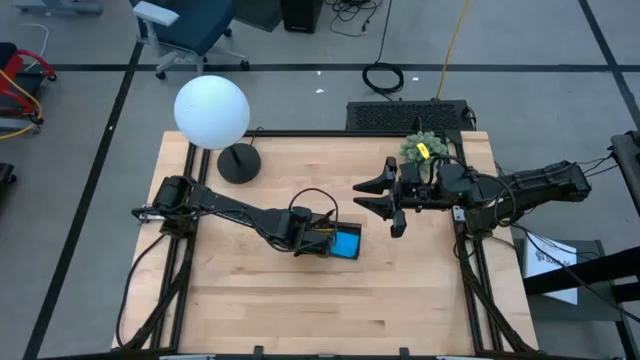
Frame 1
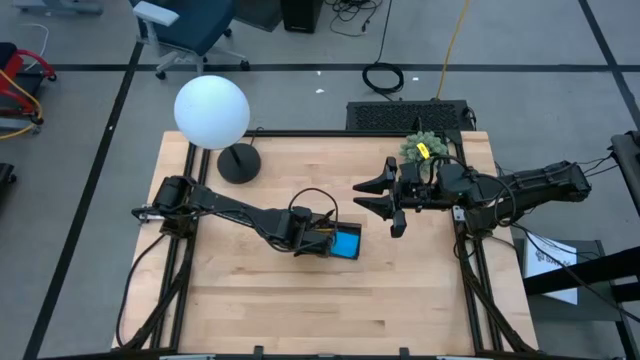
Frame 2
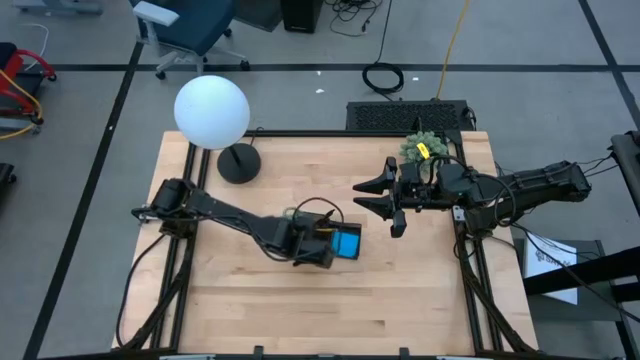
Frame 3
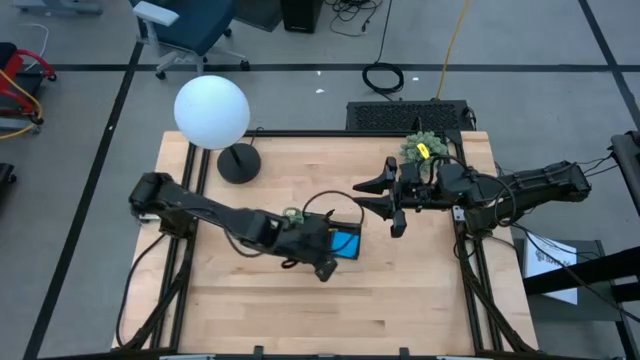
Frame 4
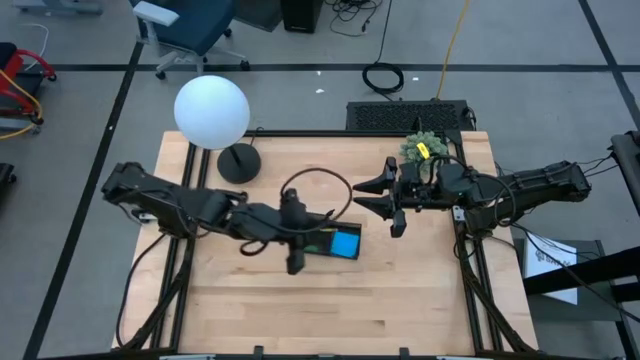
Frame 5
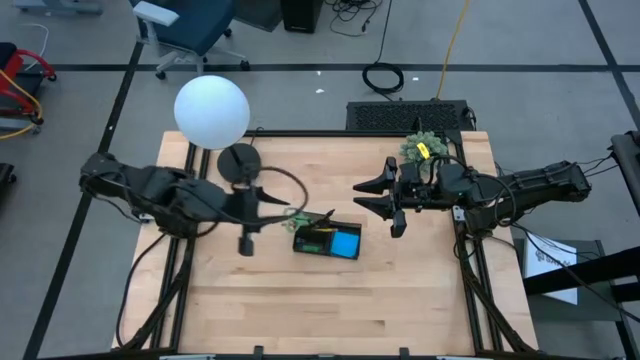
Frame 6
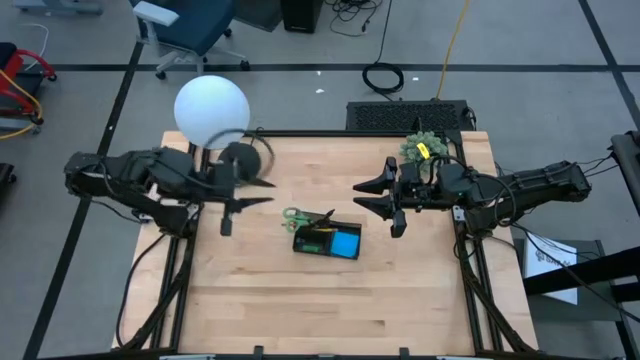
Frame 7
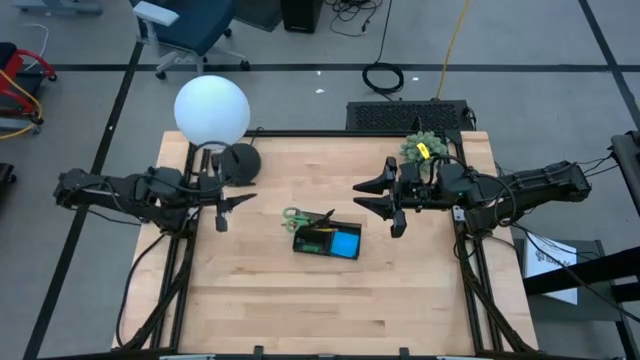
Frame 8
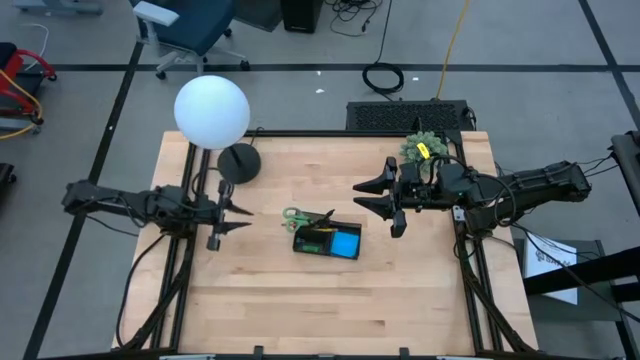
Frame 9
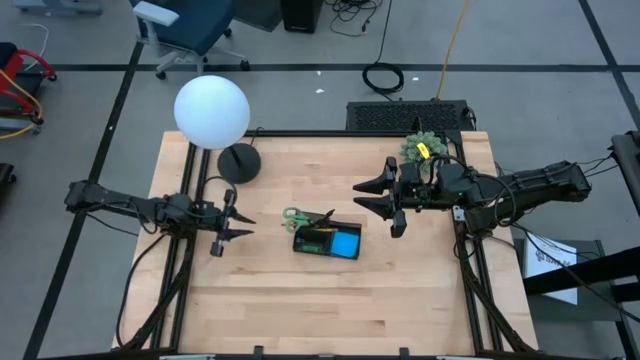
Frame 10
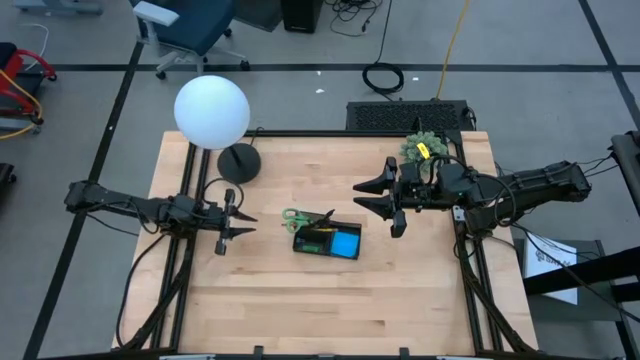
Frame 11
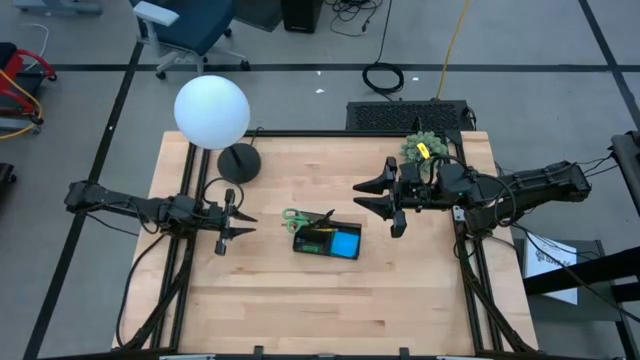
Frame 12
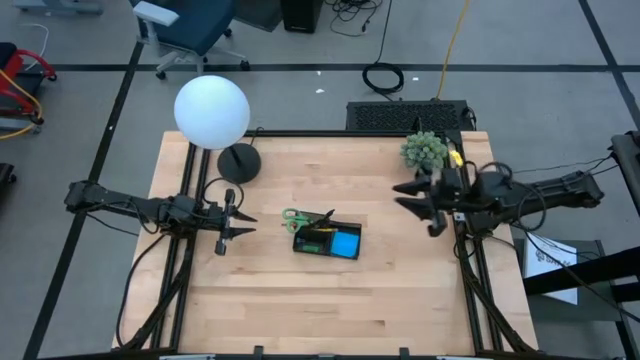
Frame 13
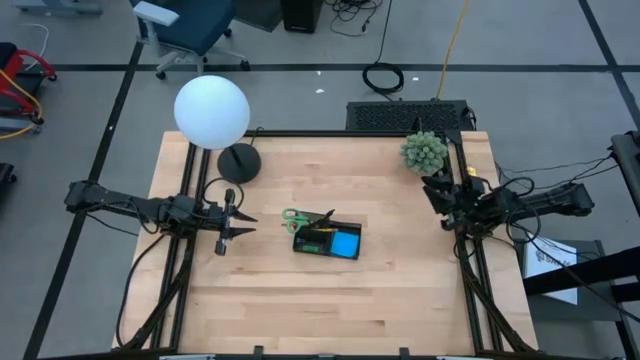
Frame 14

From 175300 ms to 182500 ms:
Task: Pick and place office supplies into organizer
Return to Home Position

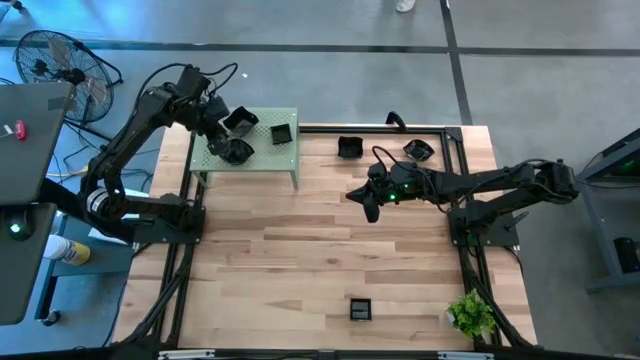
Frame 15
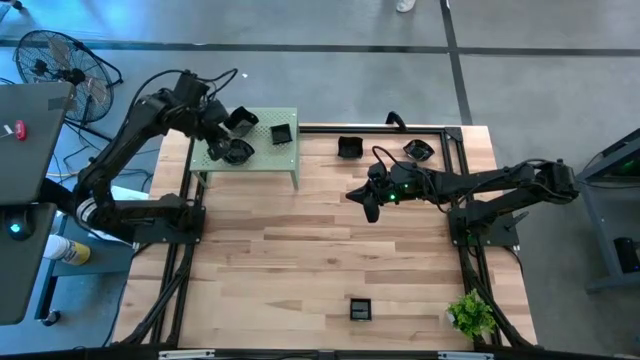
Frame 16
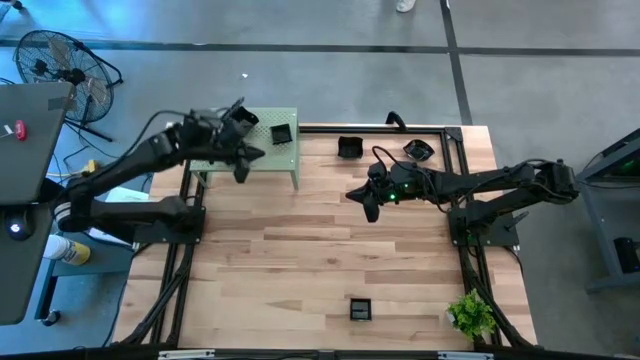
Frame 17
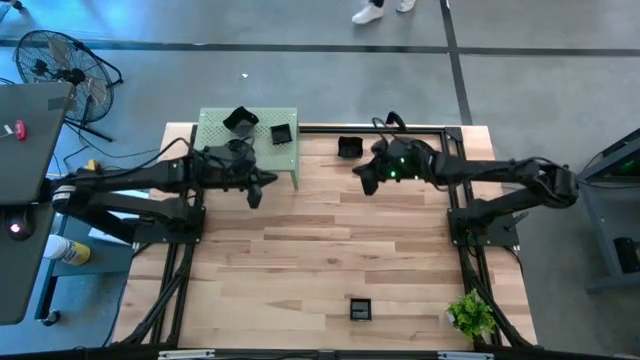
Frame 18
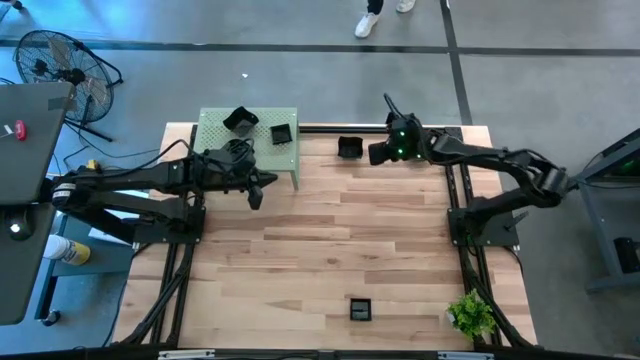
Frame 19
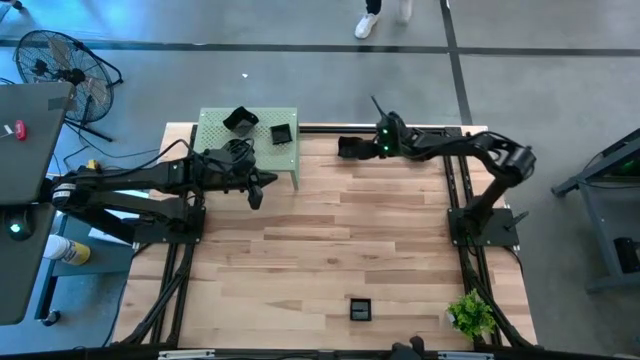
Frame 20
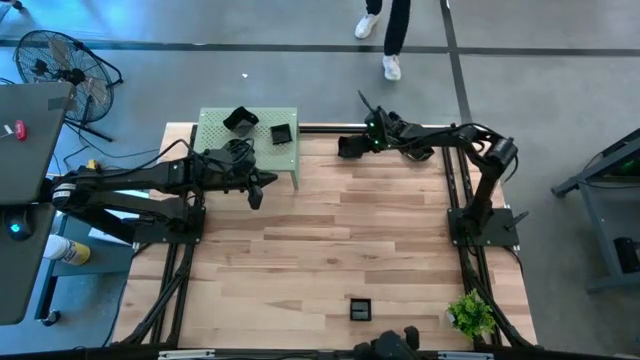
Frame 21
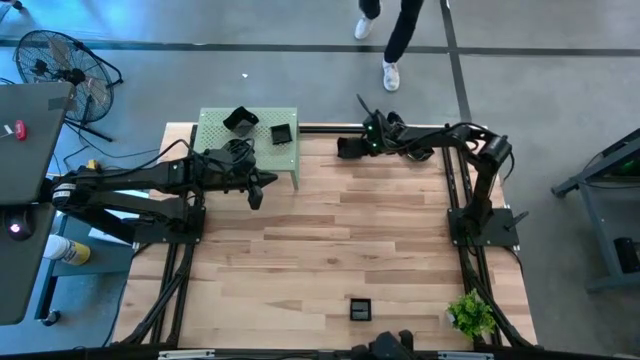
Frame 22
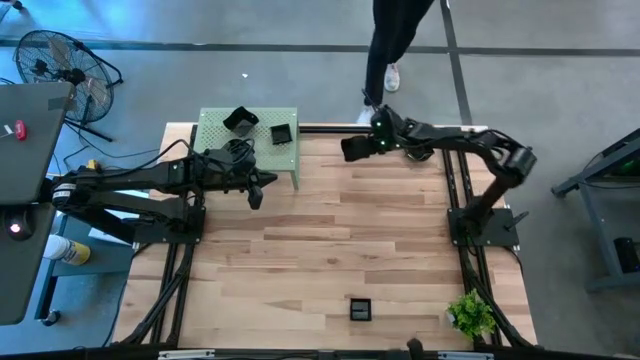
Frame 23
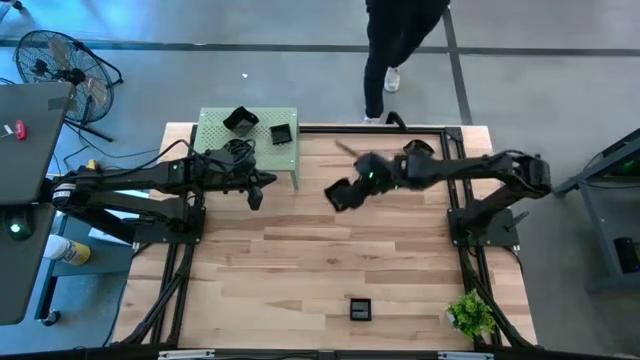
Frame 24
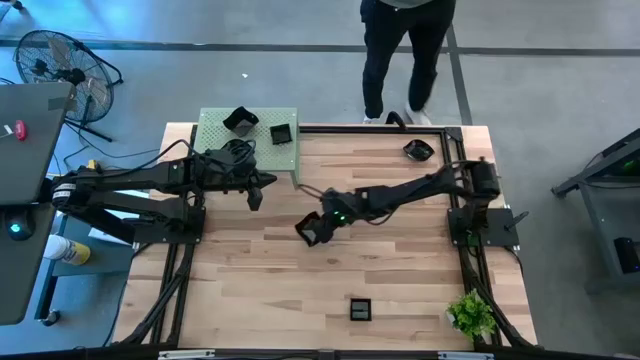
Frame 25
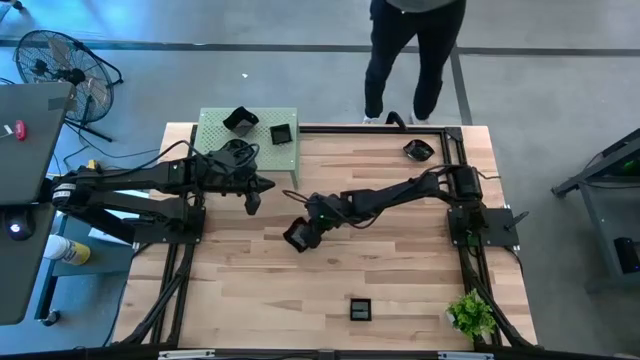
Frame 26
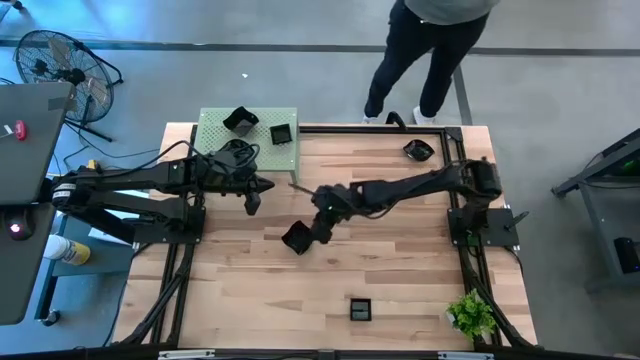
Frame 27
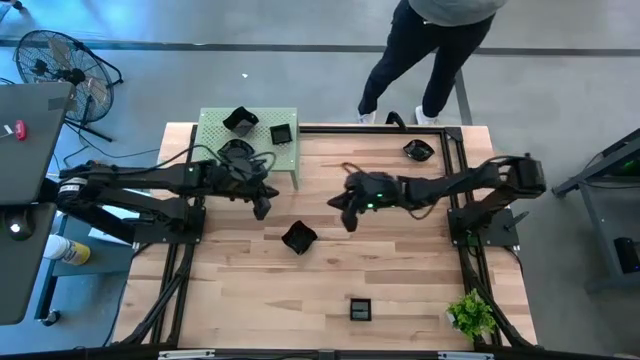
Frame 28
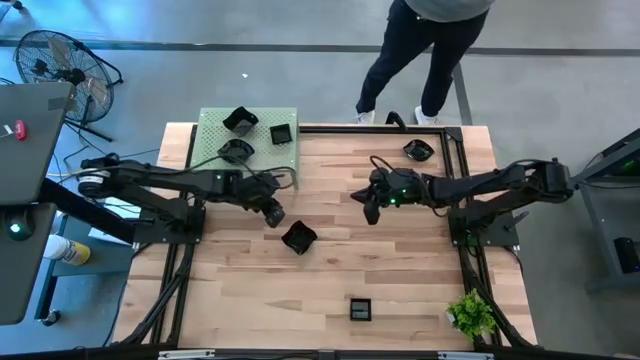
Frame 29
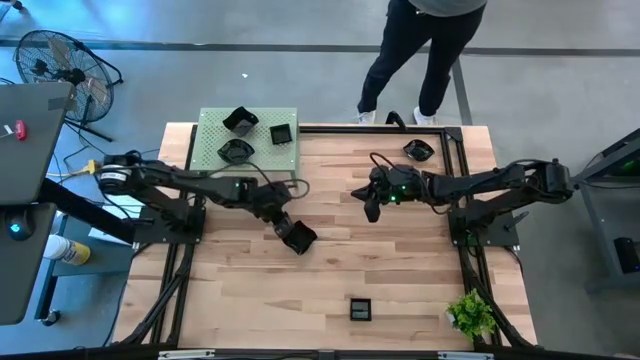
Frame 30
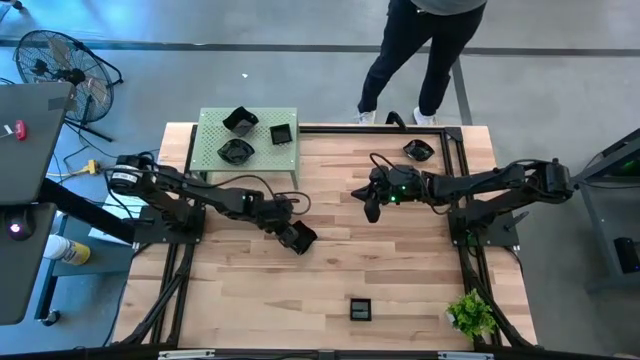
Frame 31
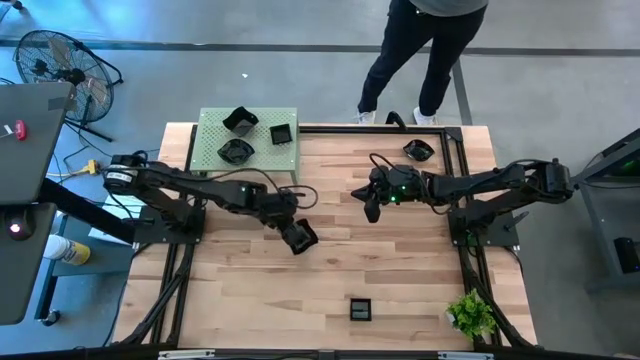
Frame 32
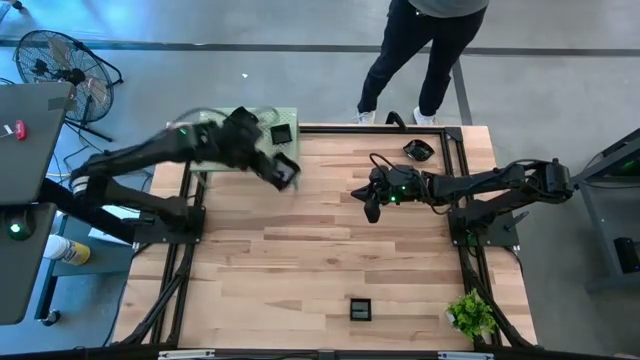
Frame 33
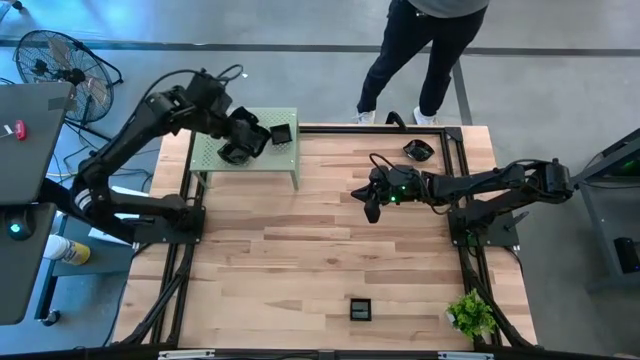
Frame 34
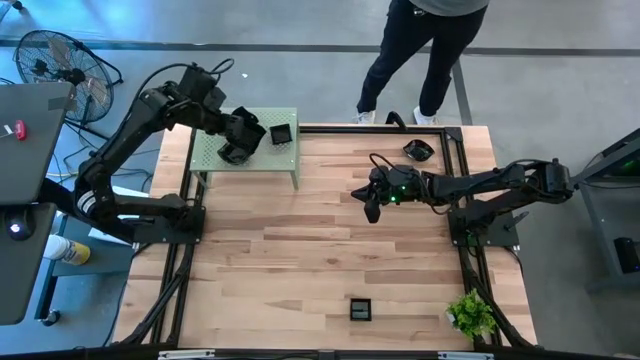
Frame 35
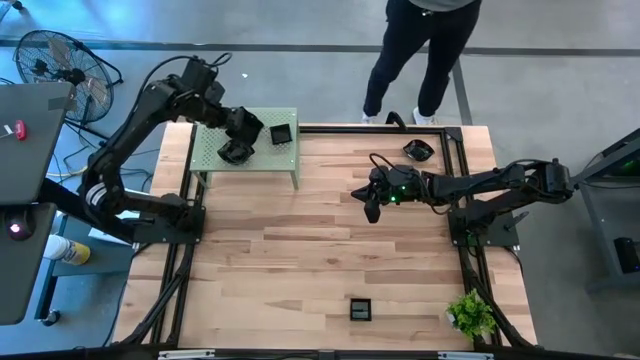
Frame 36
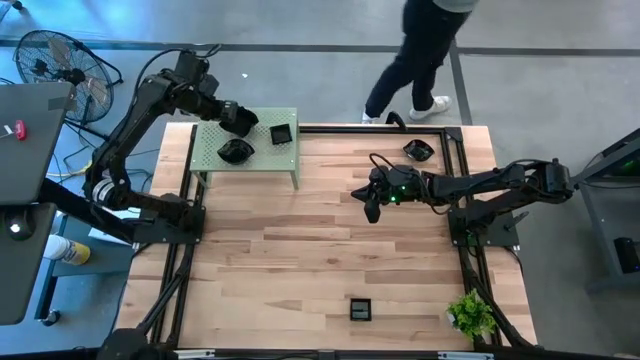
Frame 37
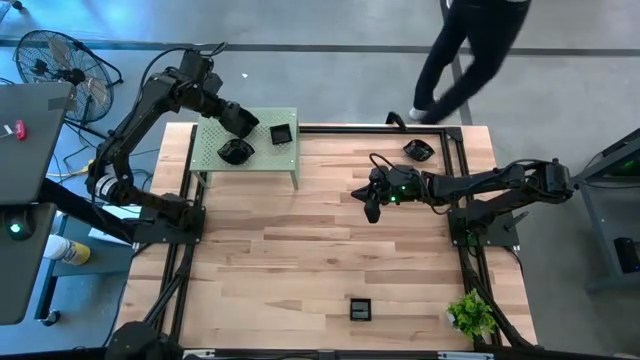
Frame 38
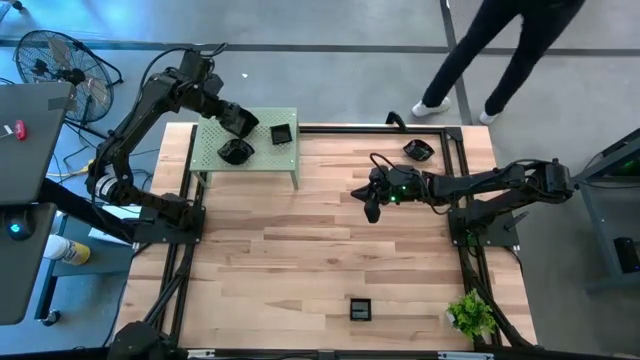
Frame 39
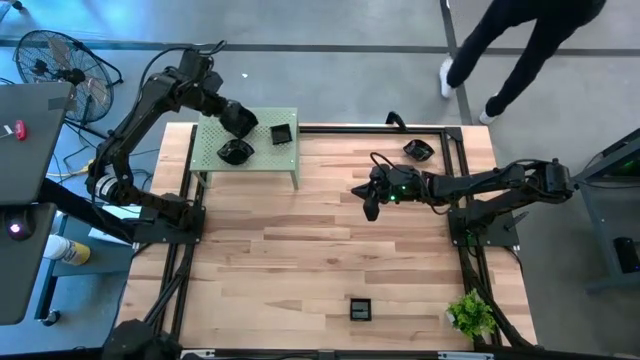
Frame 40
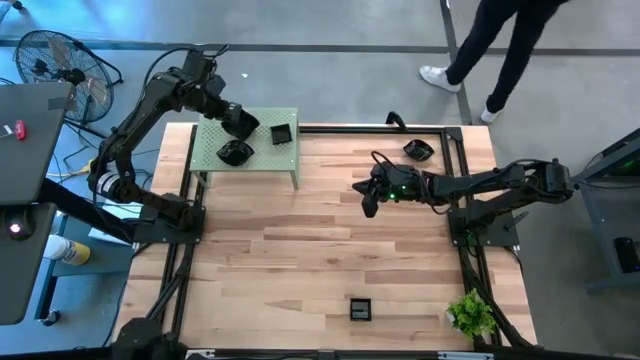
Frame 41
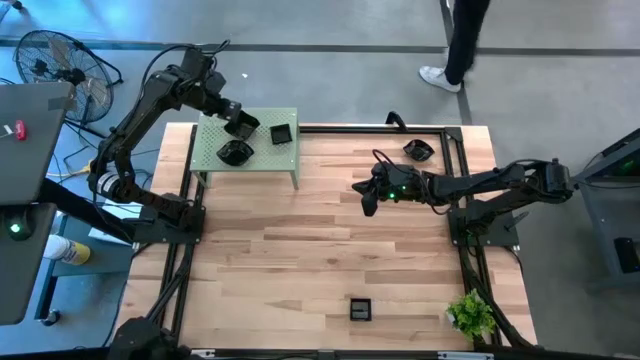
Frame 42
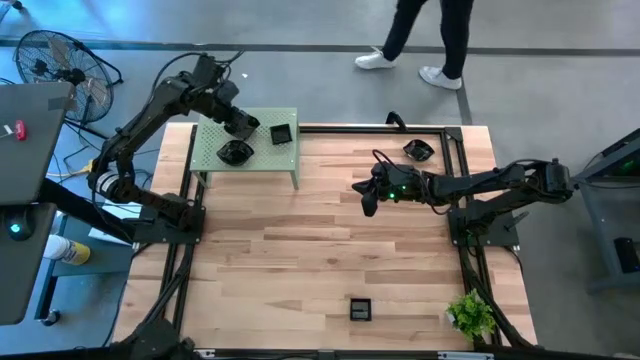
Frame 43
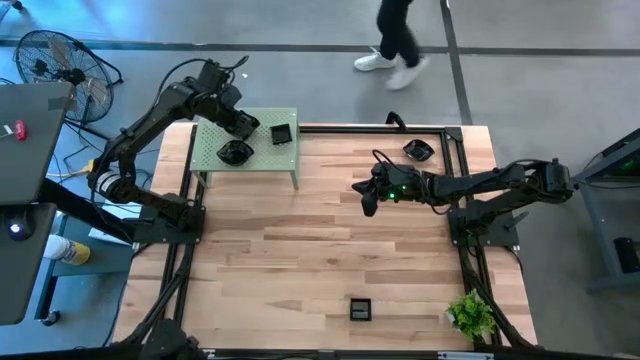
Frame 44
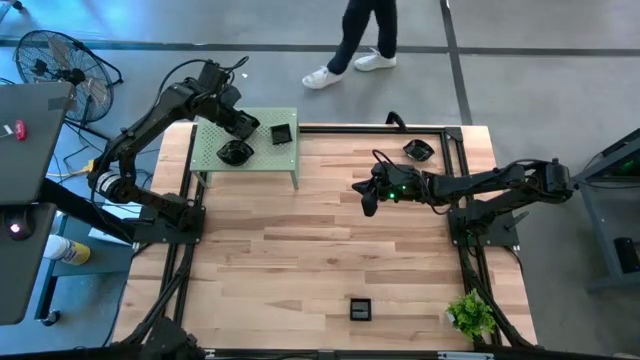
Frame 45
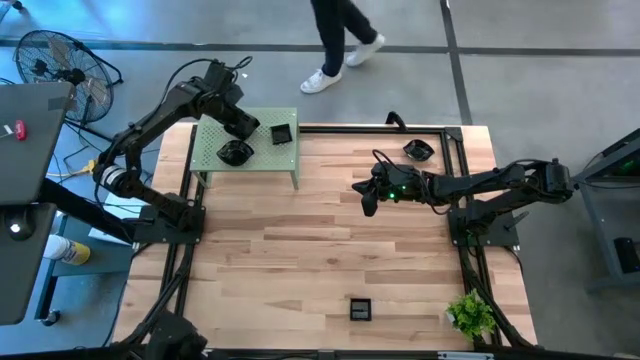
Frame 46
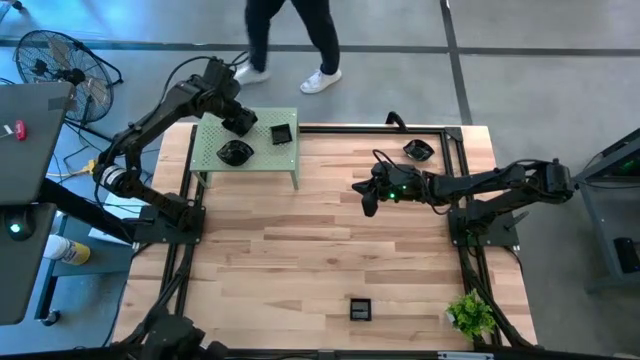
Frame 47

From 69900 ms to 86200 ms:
Task: Pick & Place Mini shaped plates
Stack the black distorted square plate on top of the stacked black distorted square plate on the shelf
